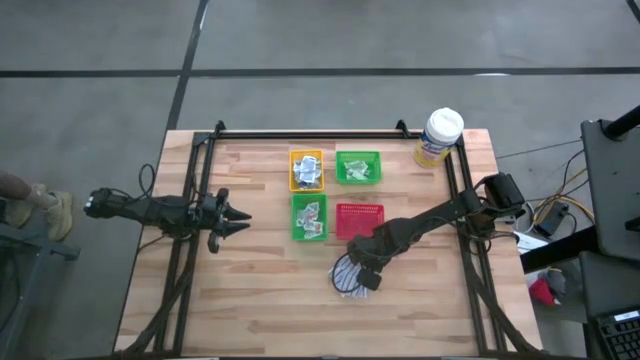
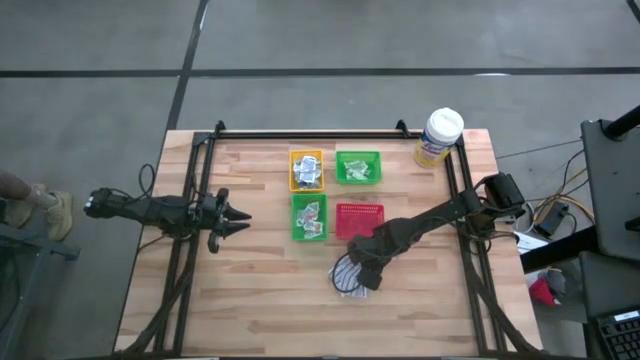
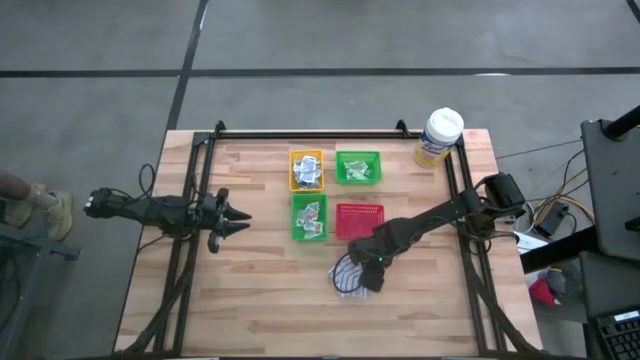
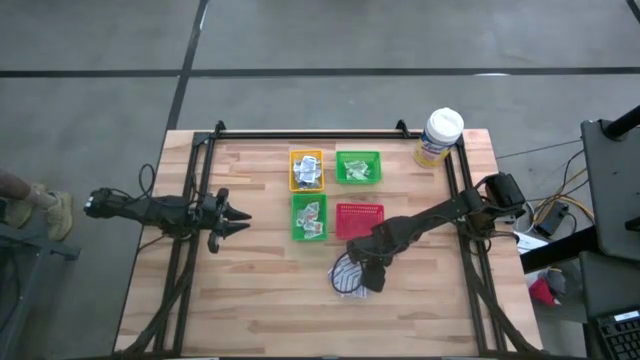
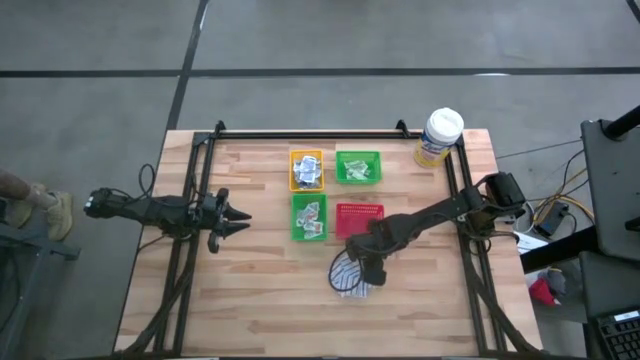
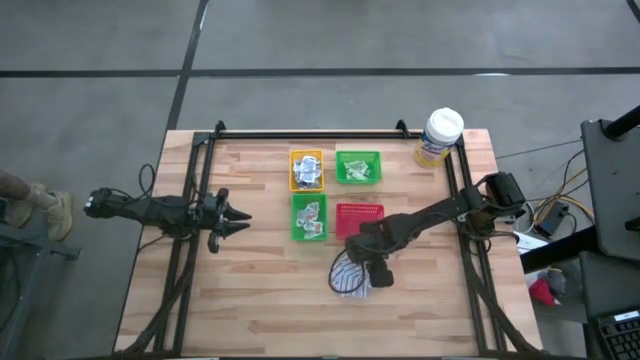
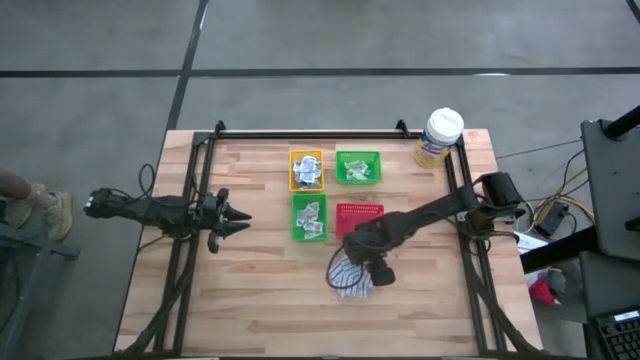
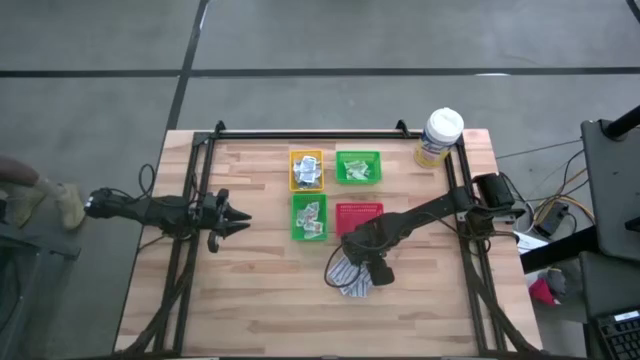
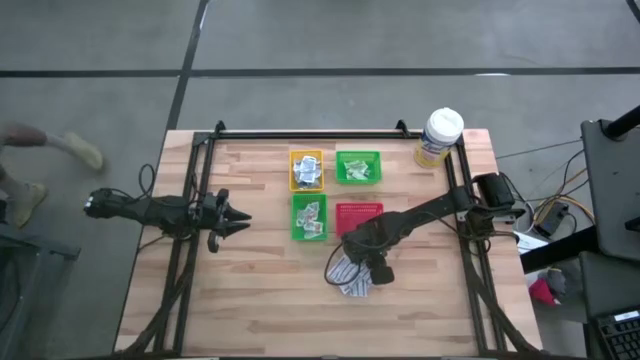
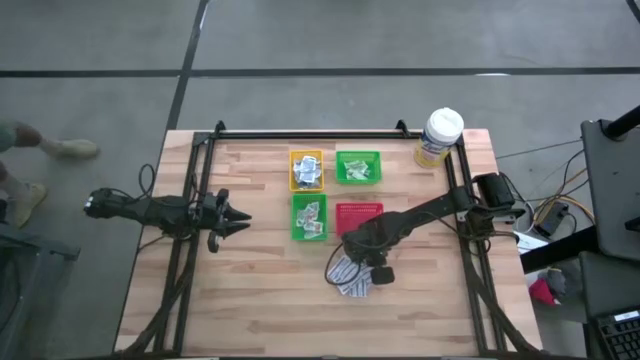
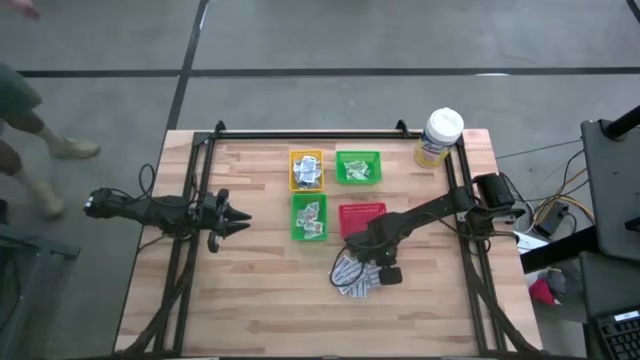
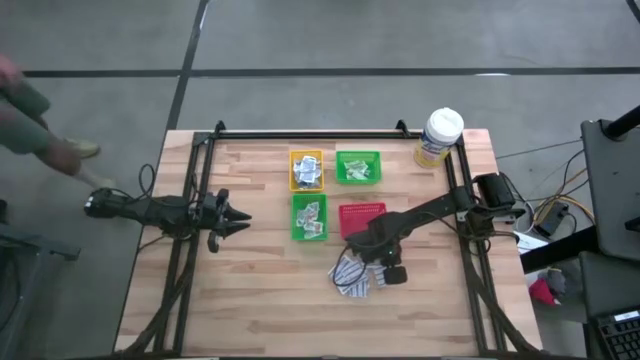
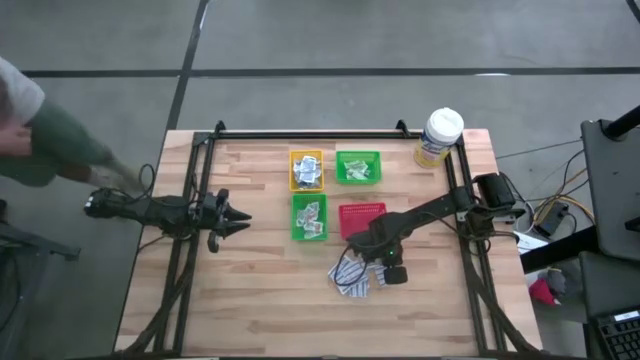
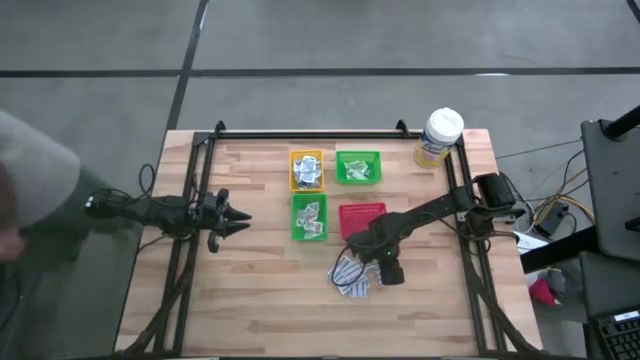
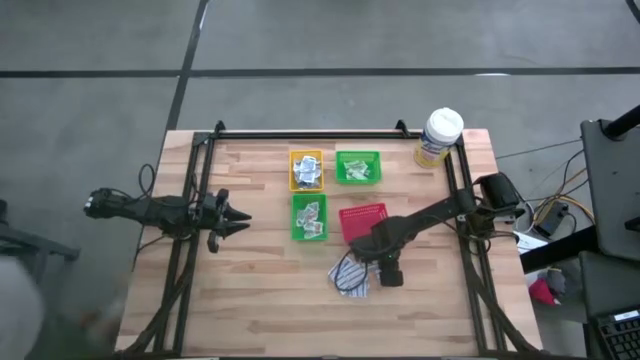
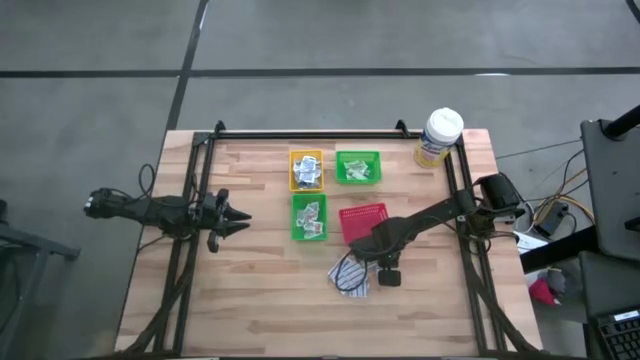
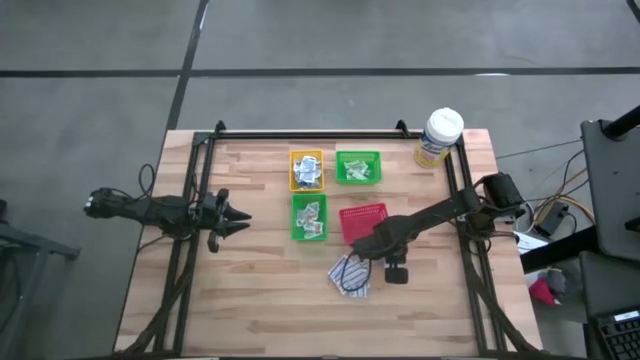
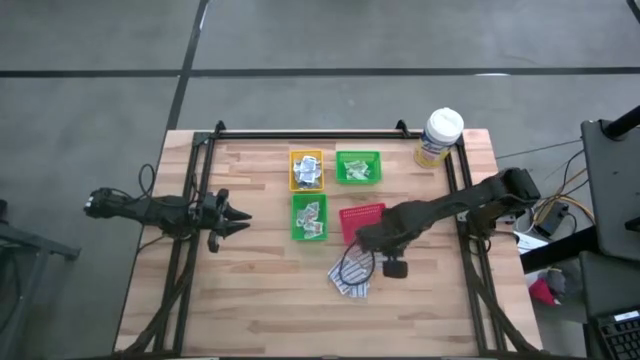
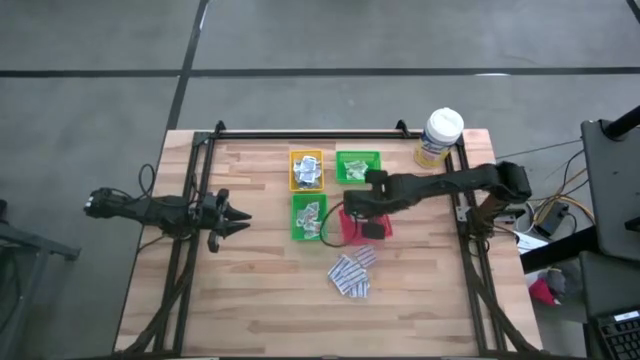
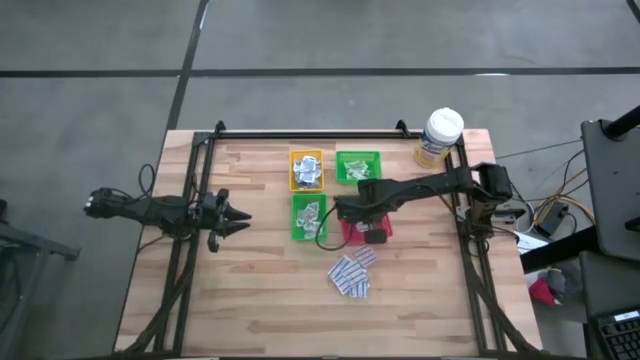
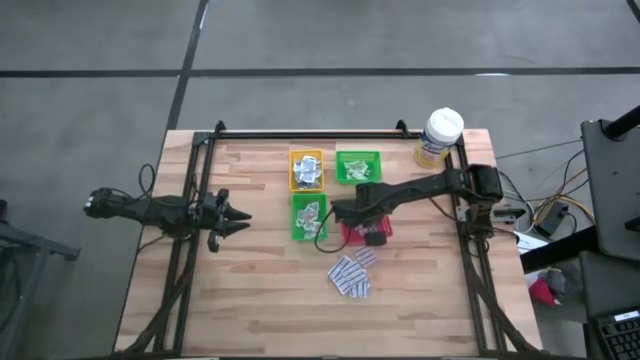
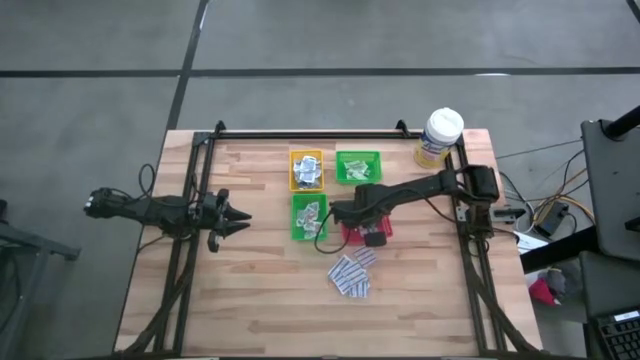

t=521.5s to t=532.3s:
Task: Pick & Place First Aid Supplies
Put the blue bandage pack into the red bin

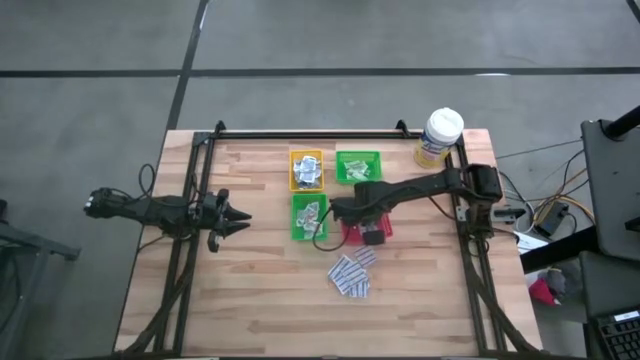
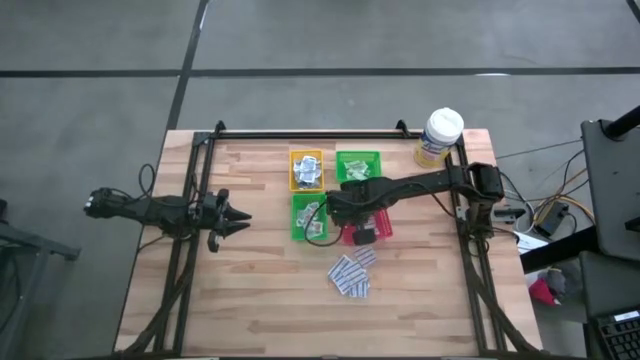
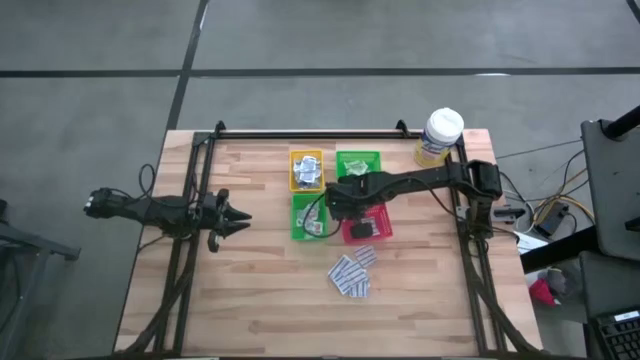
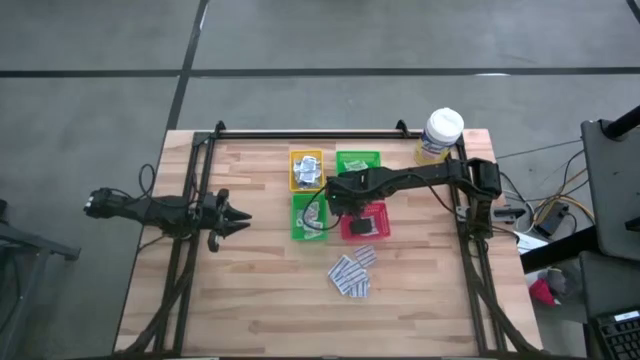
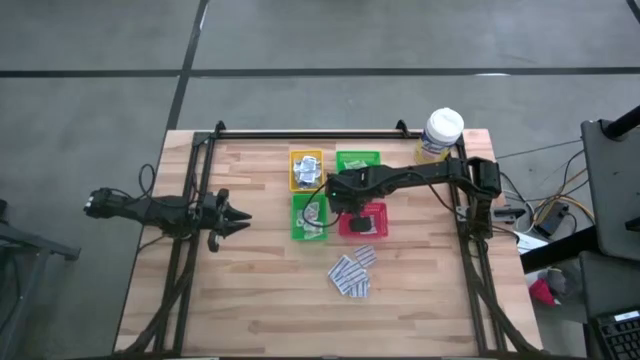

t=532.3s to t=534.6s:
Adjust the red bin on the table

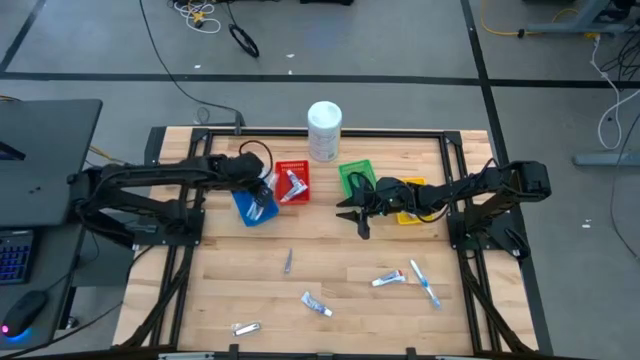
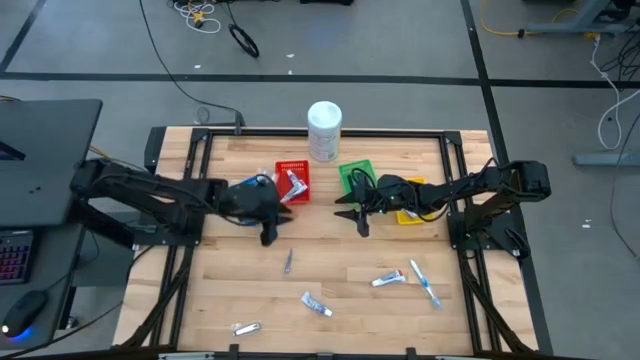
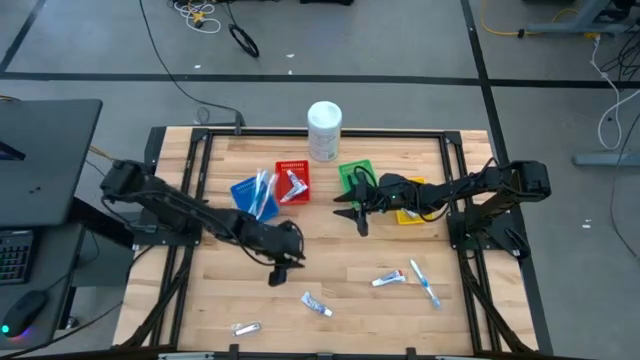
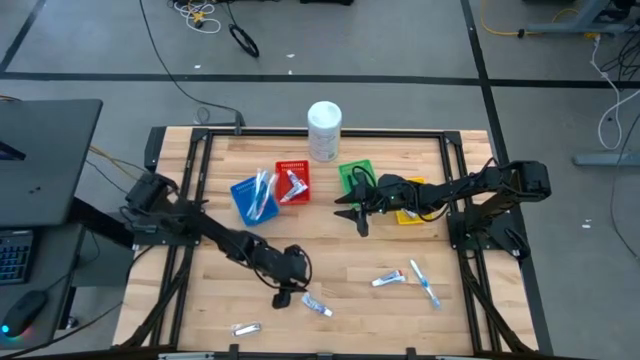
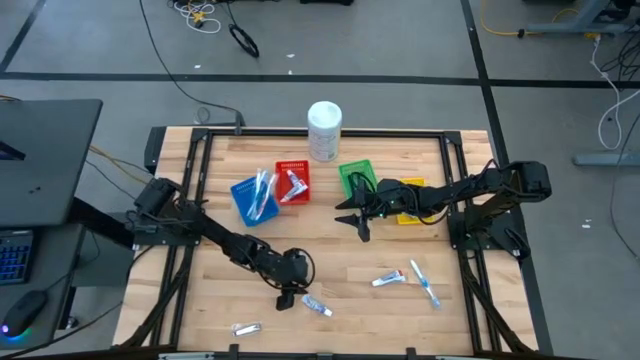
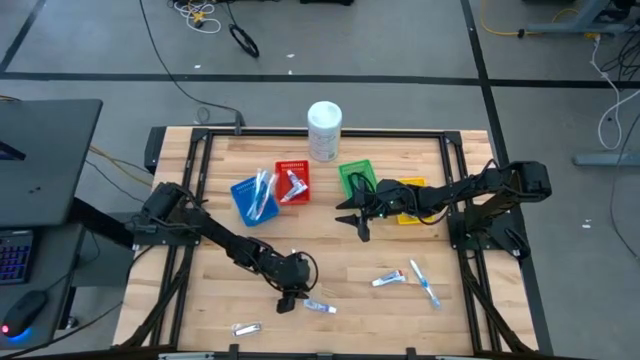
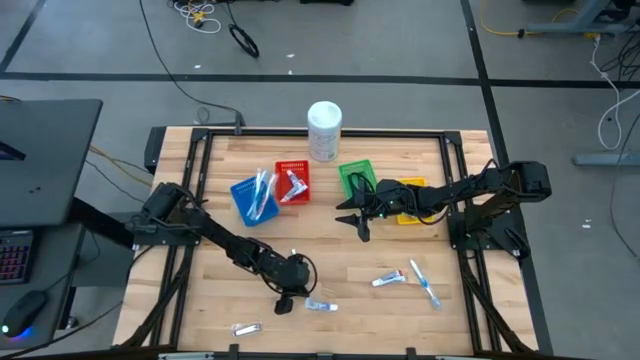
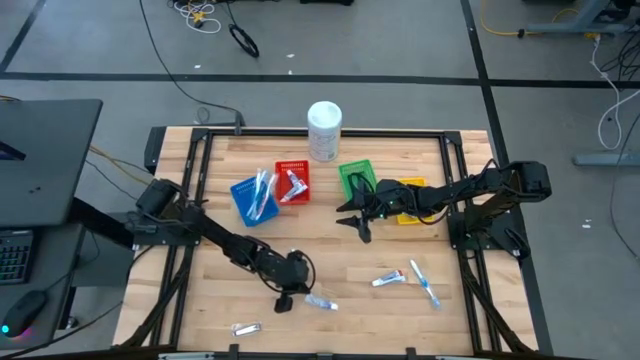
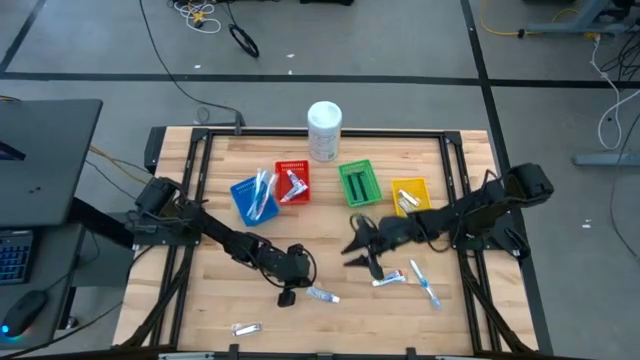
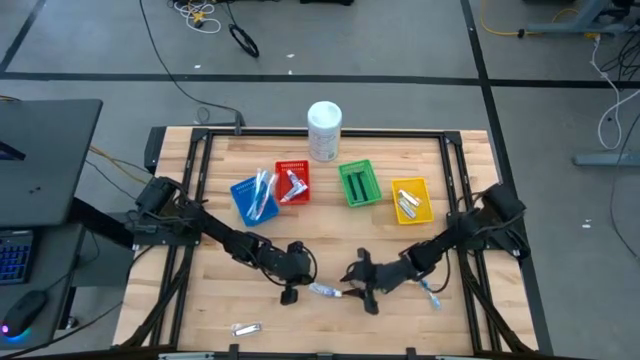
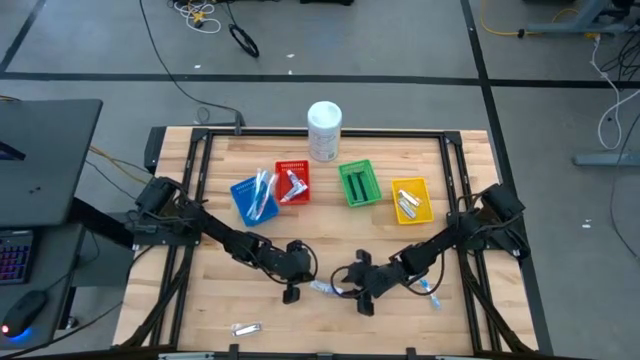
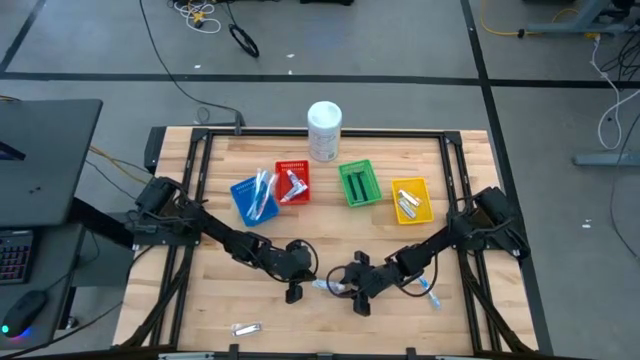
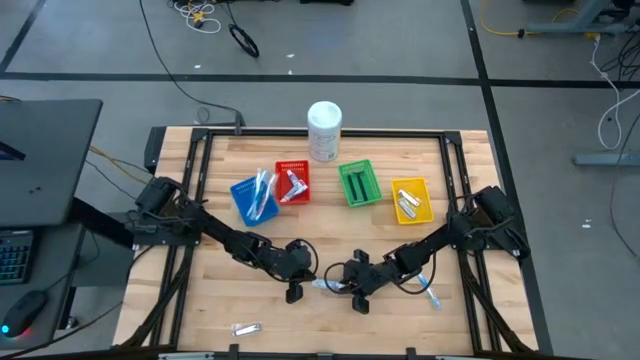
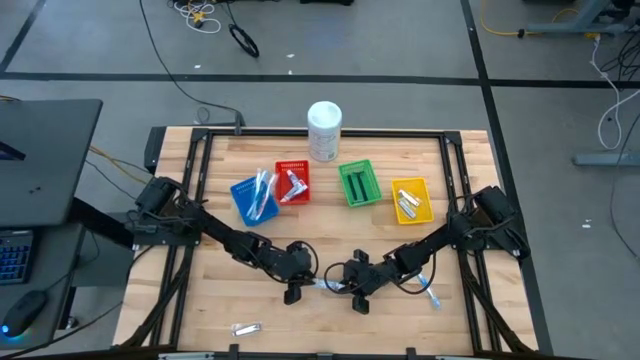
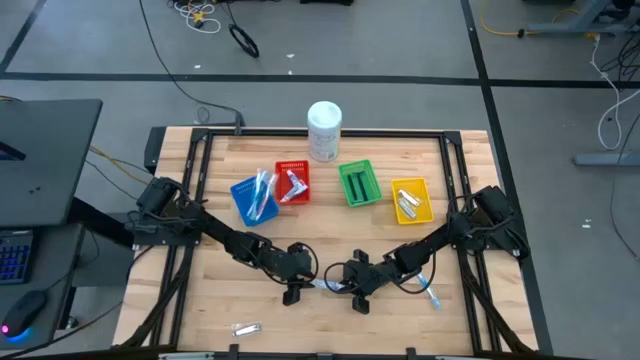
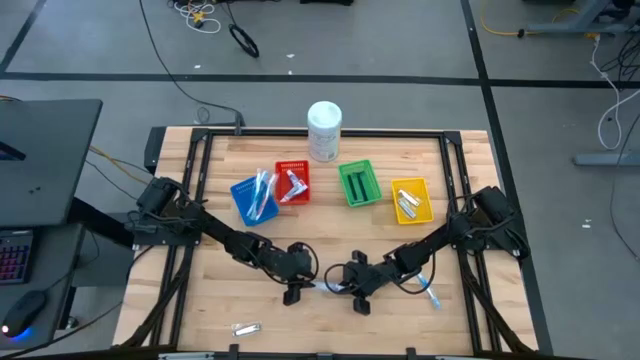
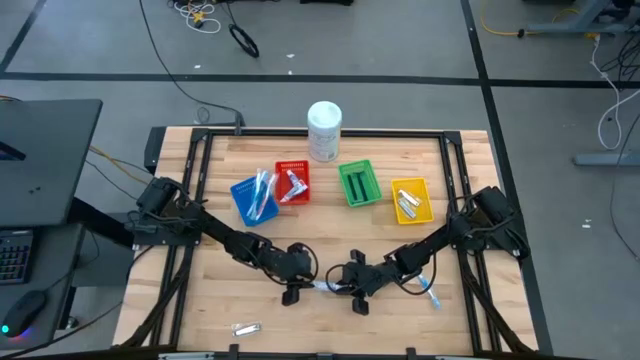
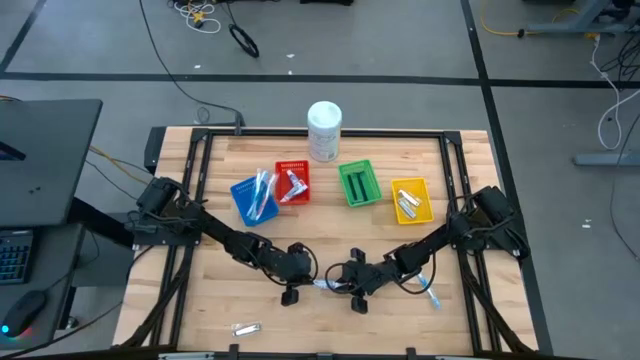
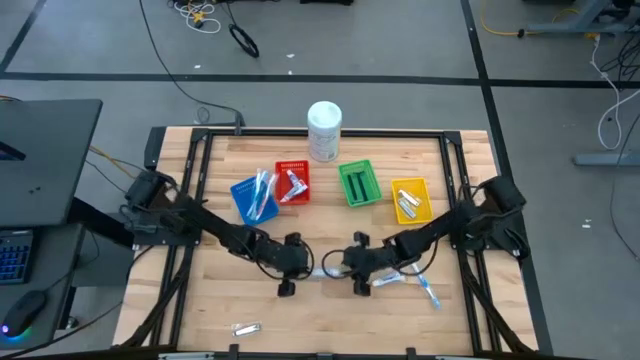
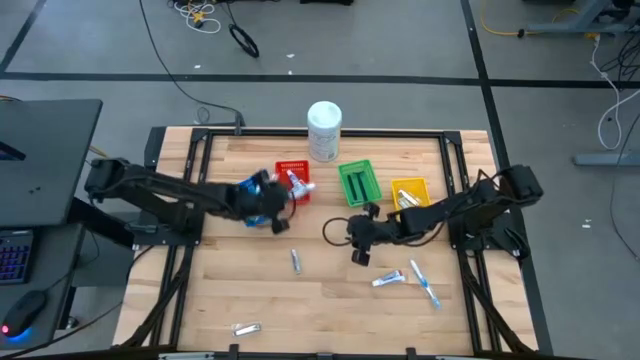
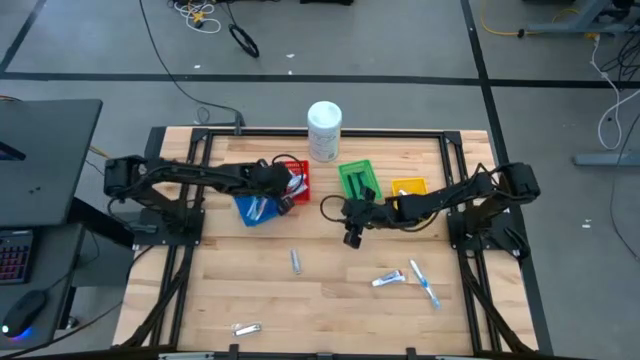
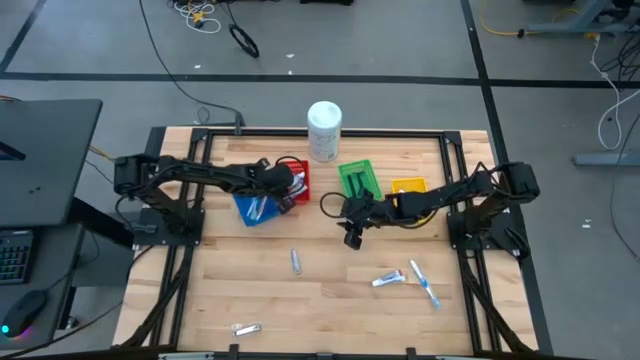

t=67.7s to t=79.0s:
Task: Pick & Place Travel size toiletries
Put the white toothpaste into the red bin
